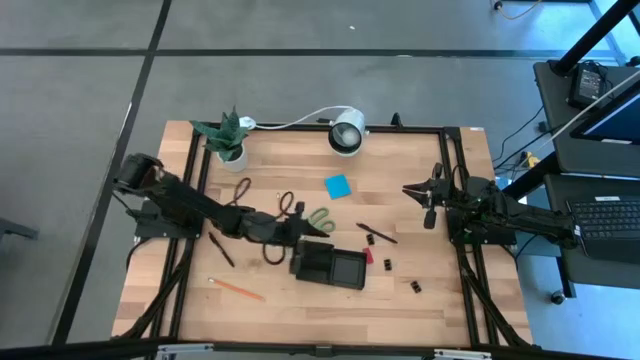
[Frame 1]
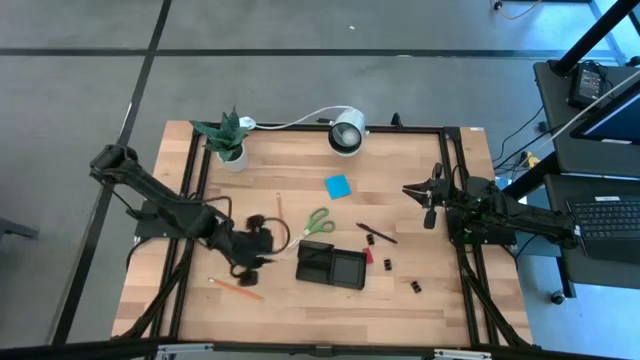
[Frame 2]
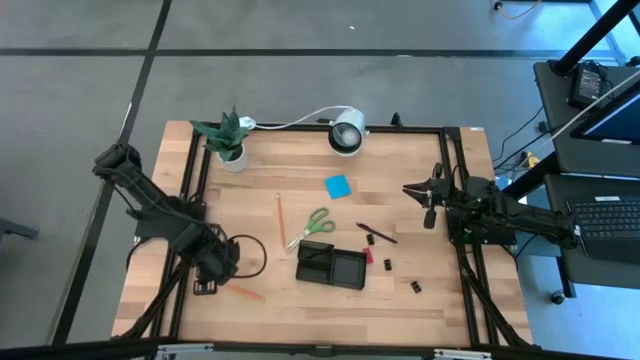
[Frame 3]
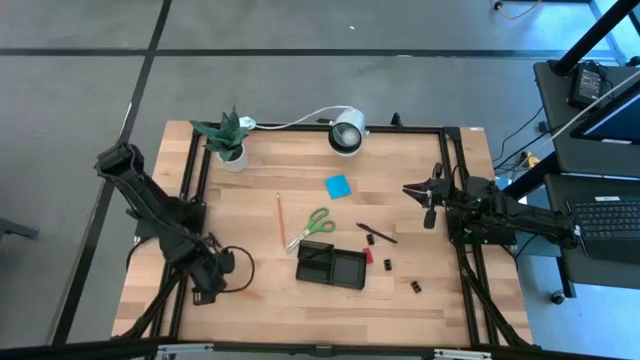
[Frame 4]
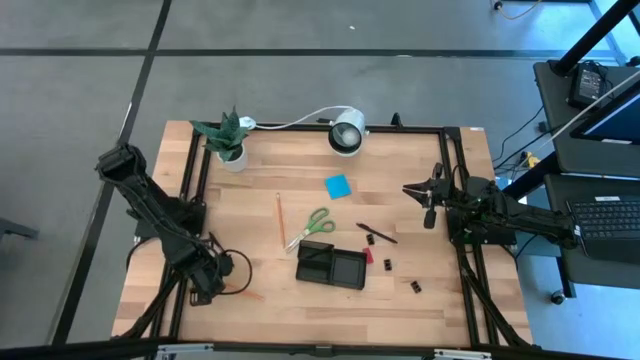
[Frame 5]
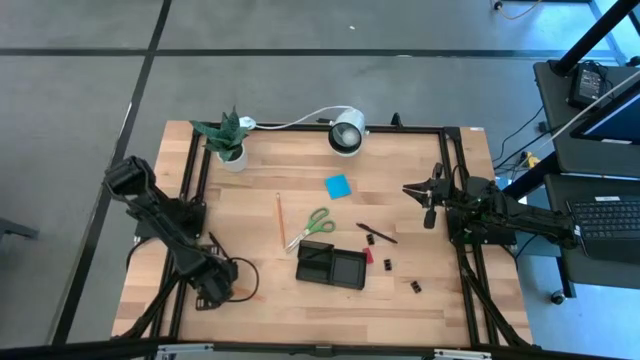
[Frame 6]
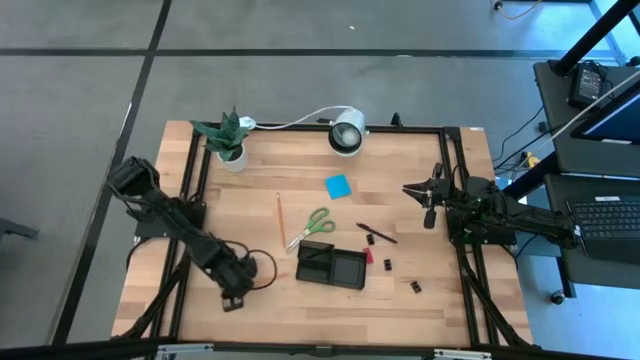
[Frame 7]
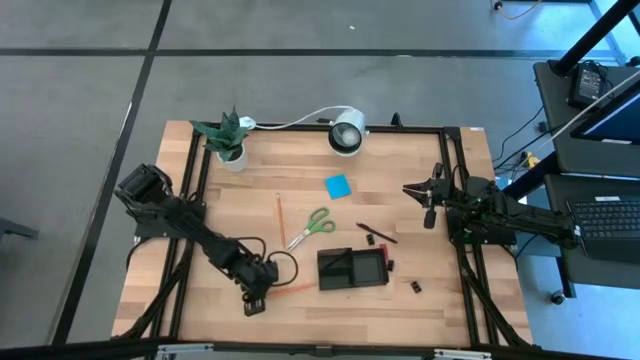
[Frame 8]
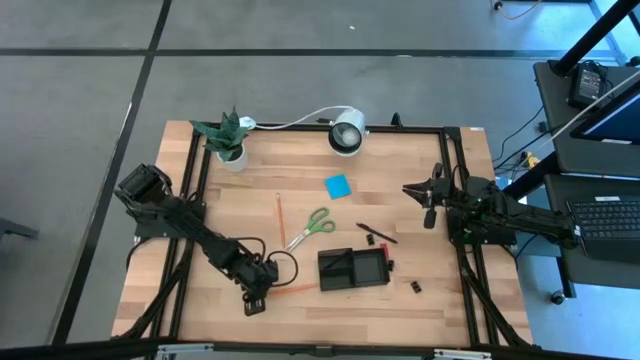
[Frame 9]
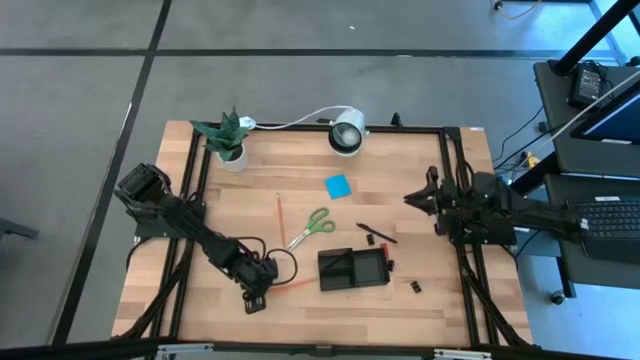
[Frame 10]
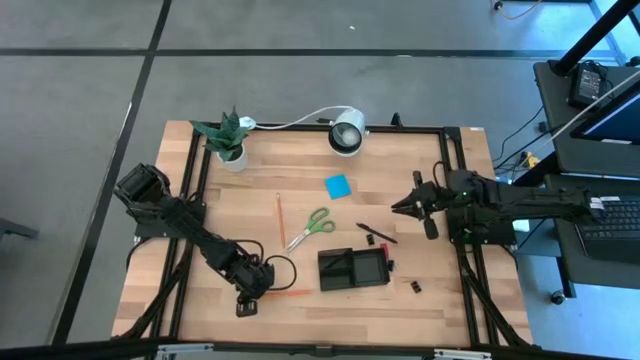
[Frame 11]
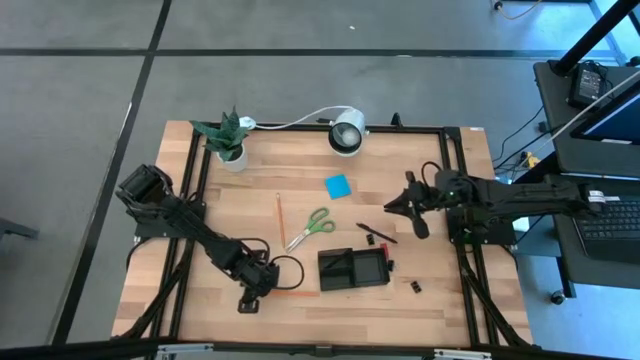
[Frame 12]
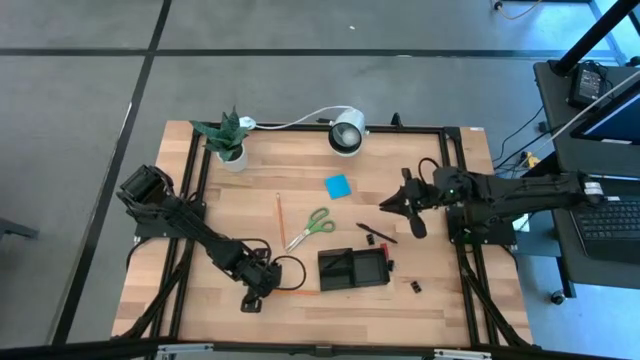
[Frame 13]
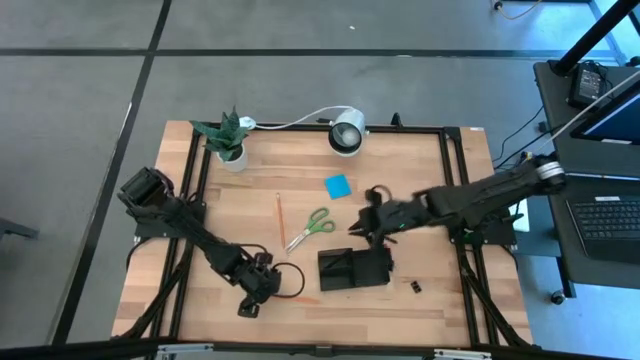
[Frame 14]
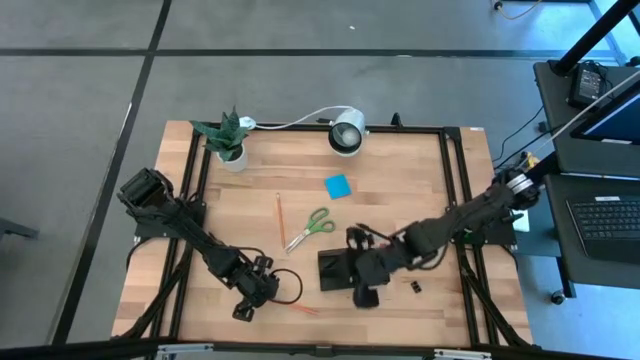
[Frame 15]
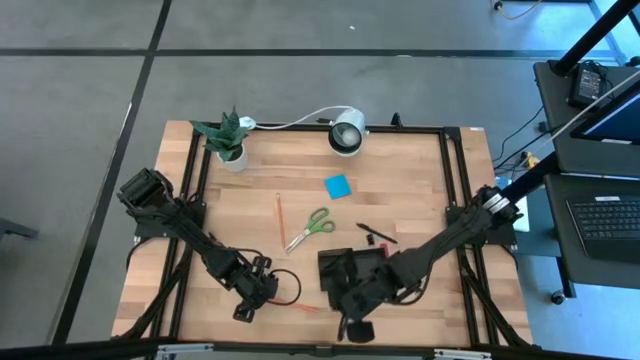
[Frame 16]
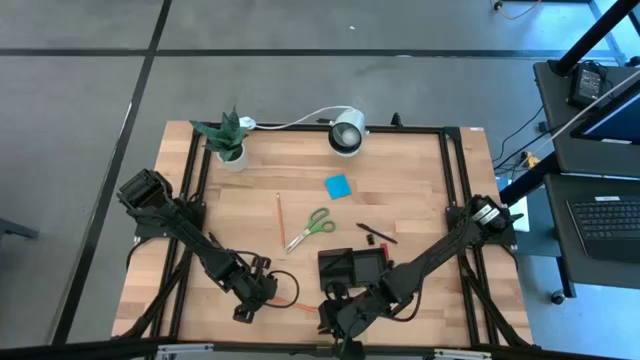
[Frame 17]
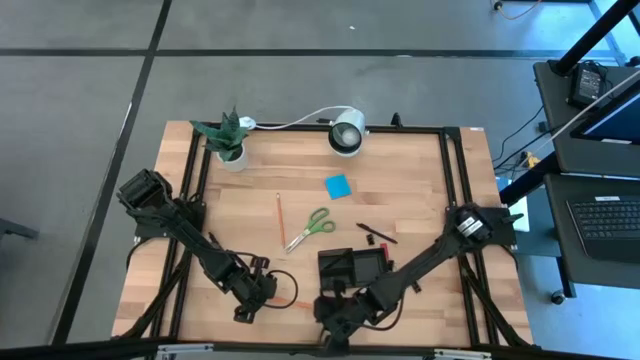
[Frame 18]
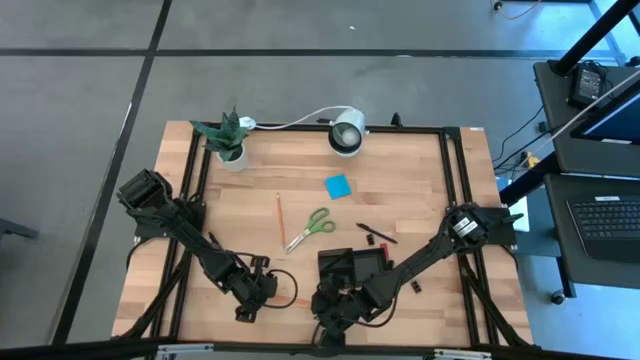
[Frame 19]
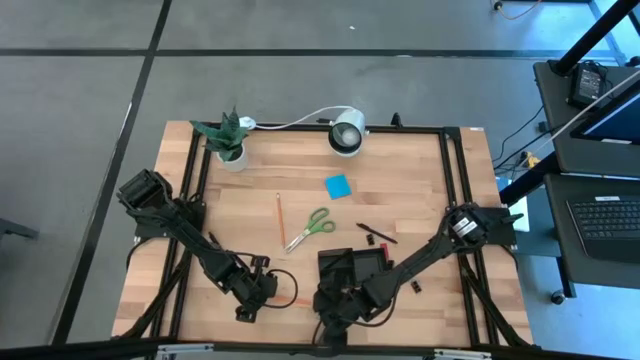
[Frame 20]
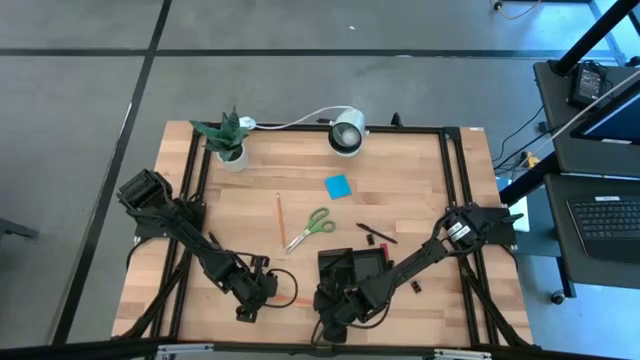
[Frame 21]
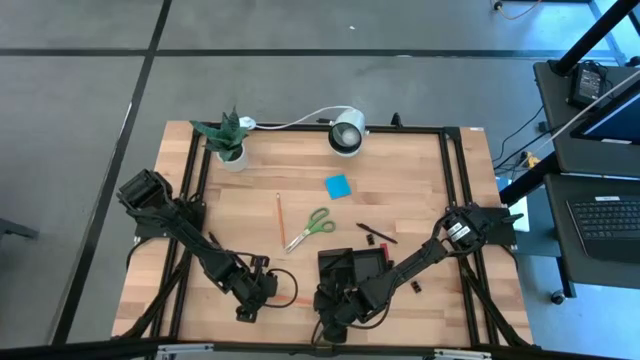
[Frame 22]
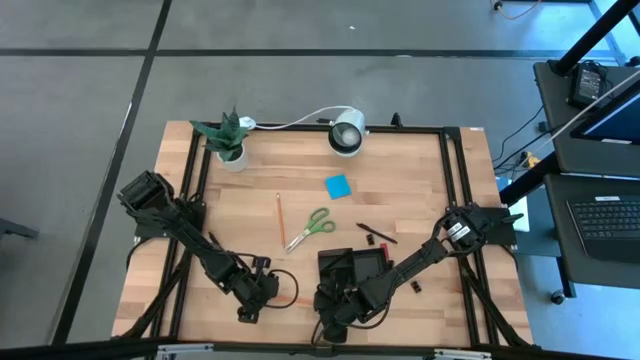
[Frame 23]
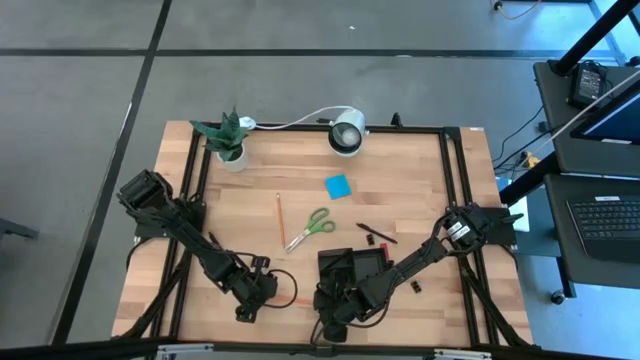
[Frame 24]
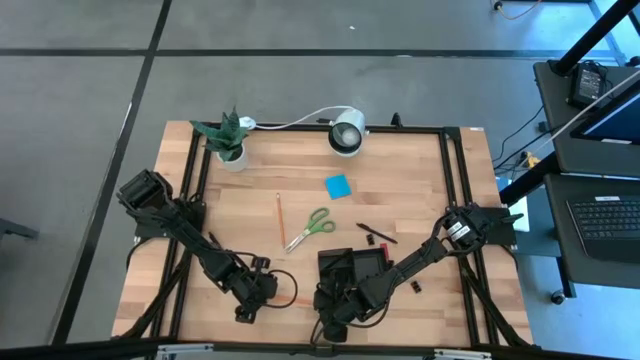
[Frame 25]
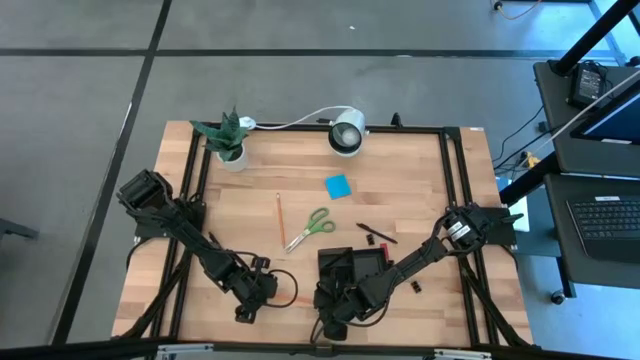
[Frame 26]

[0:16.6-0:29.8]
Task: Pick and place office supplies into organizer
Put the bottom pencil into the desk organizer

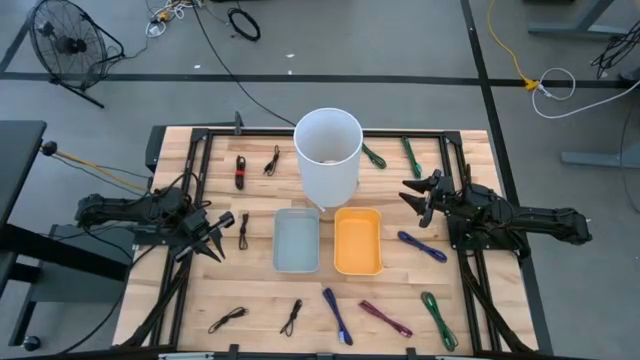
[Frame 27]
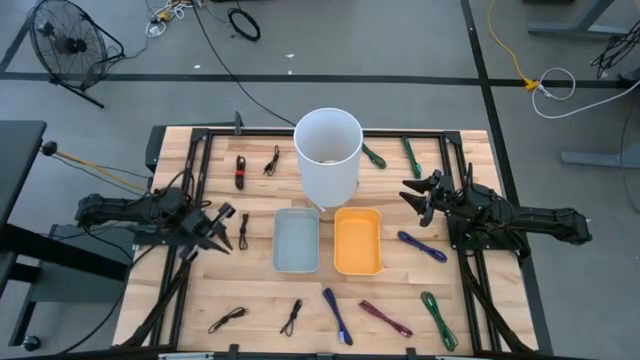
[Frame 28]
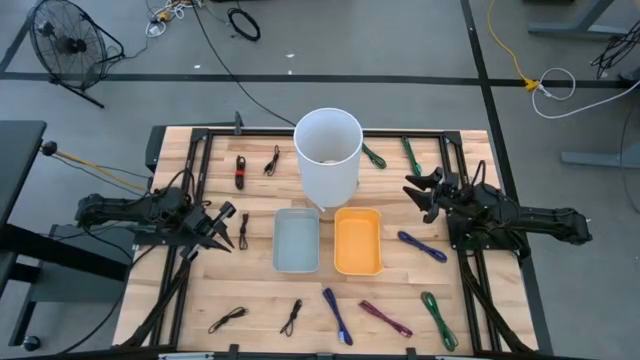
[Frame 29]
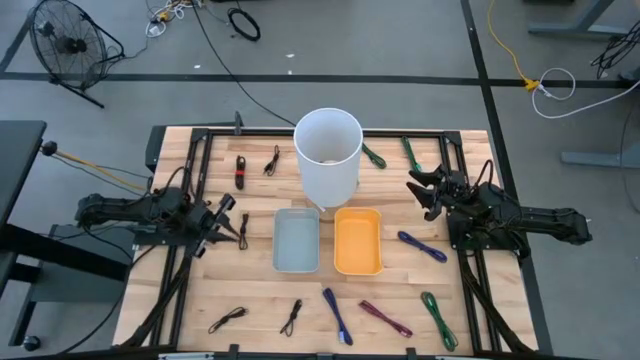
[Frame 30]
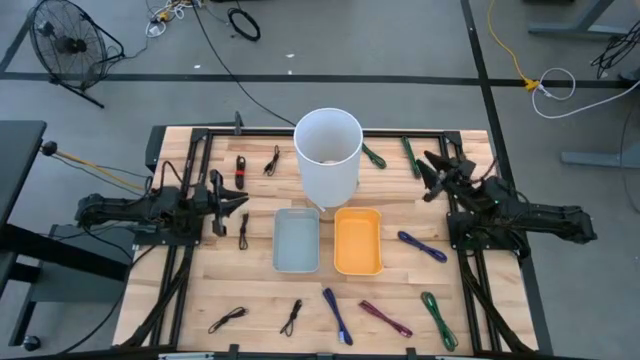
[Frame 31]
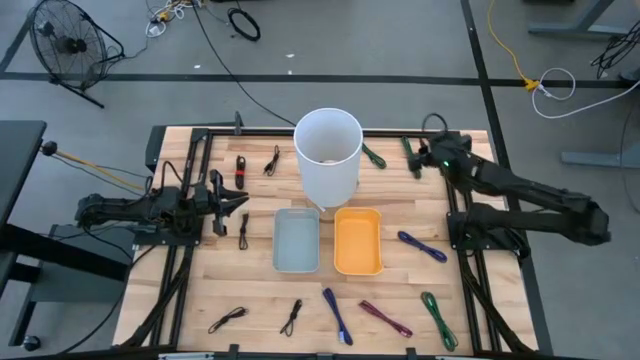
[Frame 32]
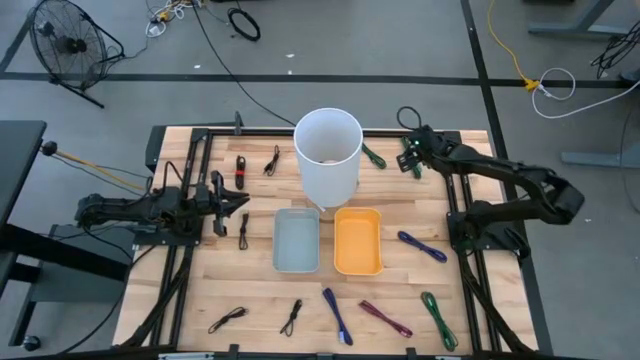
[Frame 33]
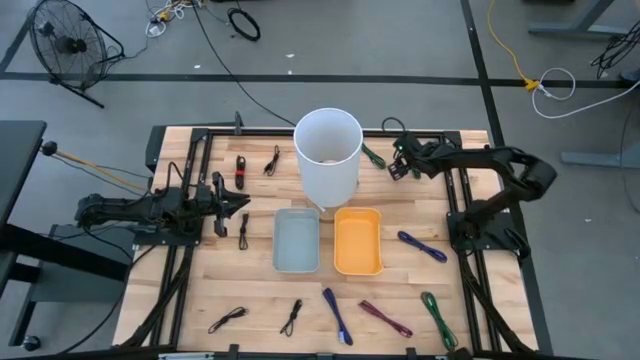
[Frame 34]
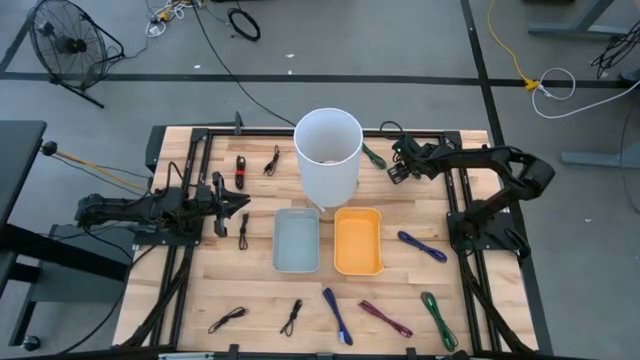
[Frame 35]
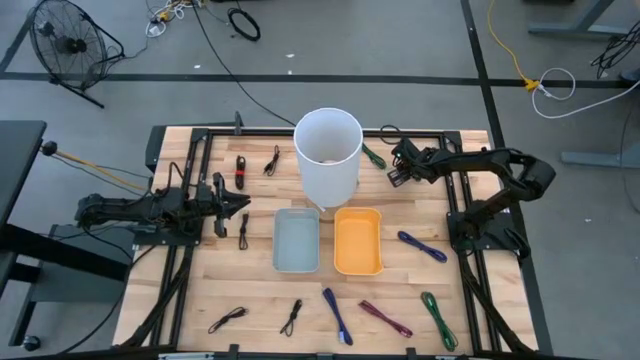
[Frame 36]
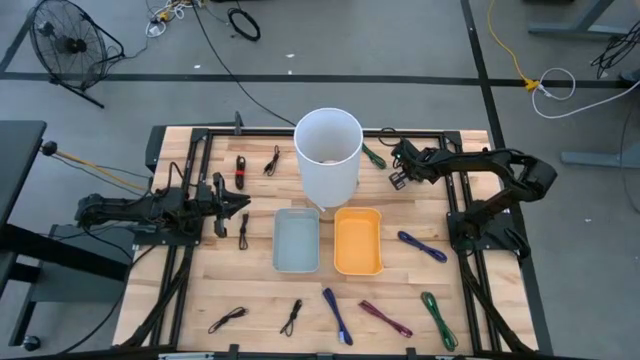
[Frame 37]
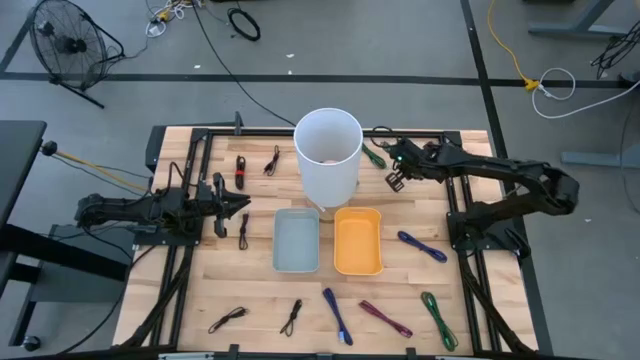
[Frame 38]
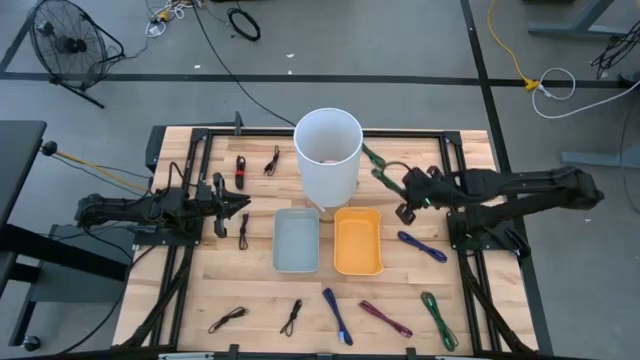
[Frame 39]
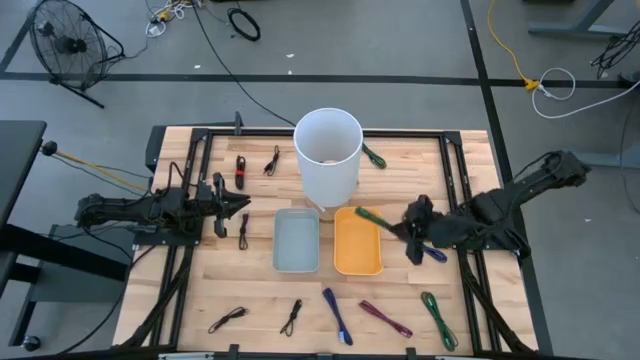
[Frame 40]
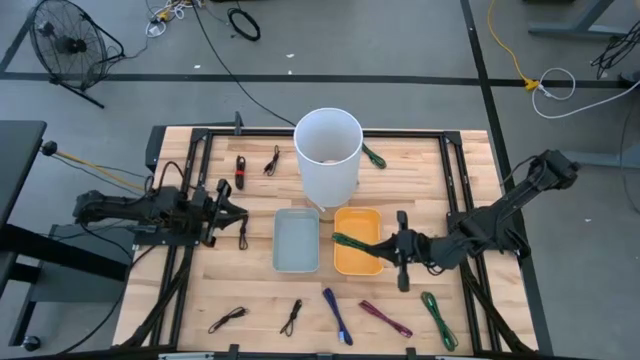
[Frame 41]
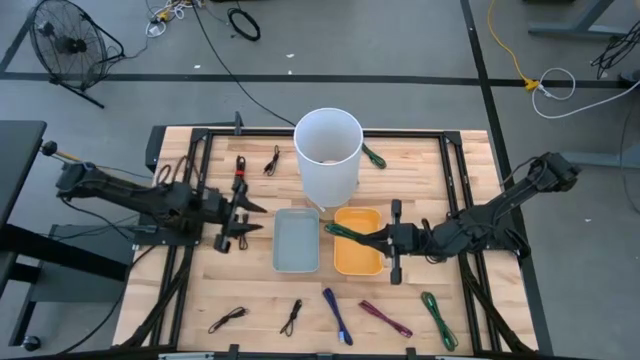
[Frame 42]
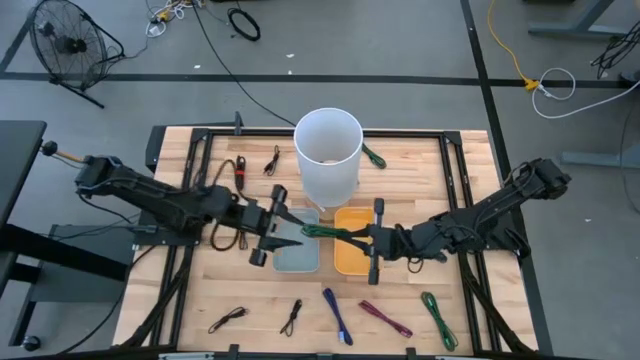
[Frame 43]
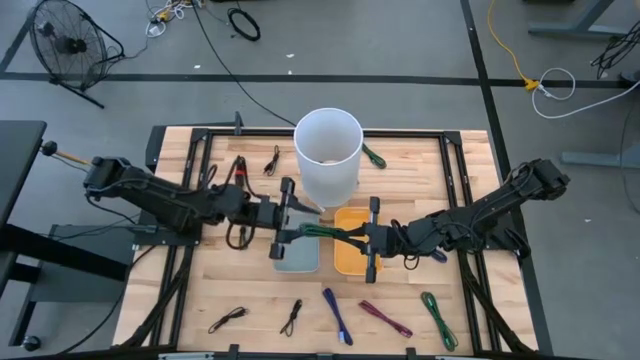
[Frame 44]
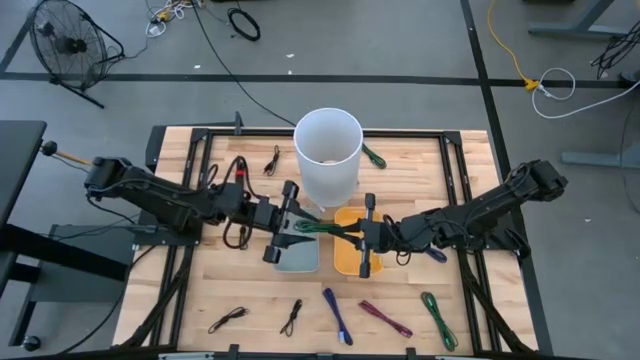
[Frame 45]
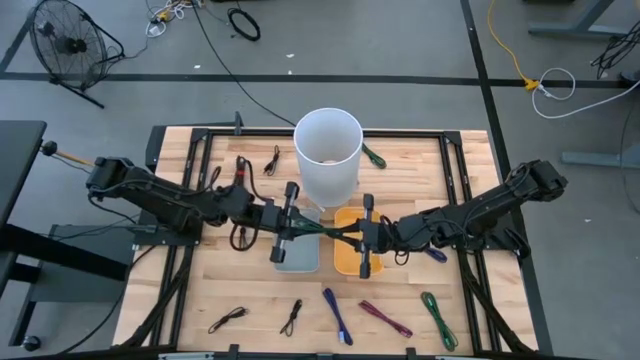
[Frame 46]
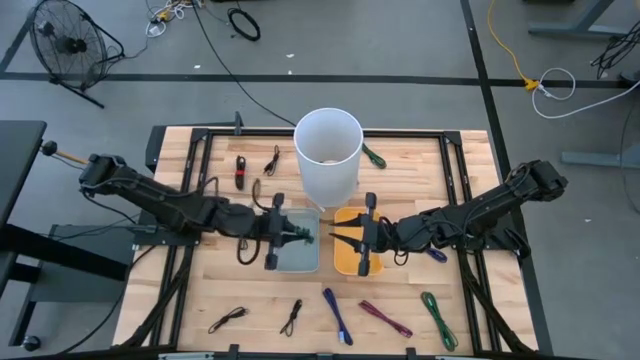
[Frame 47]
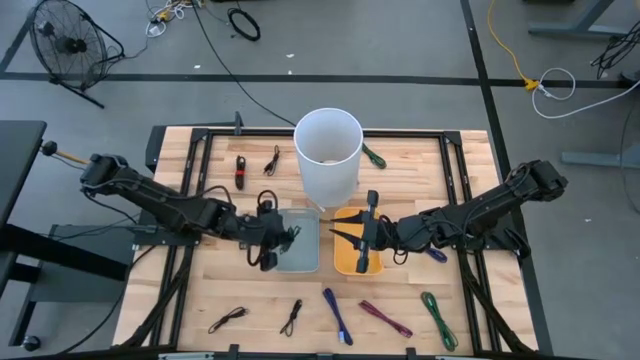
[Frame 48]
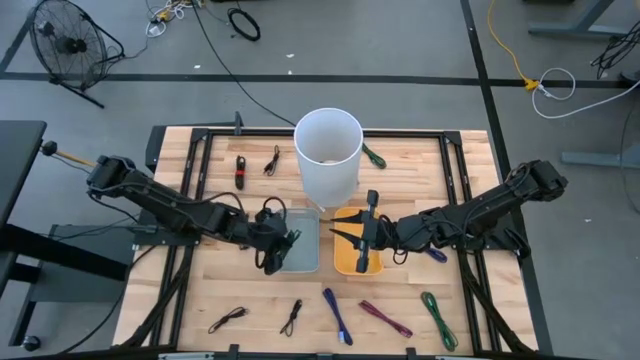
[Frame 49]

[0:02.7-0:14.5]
Task: Pick & Place USB Port
Put the green charger cable into the gray bin
